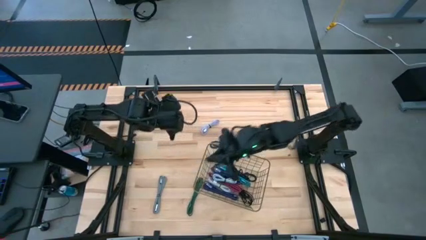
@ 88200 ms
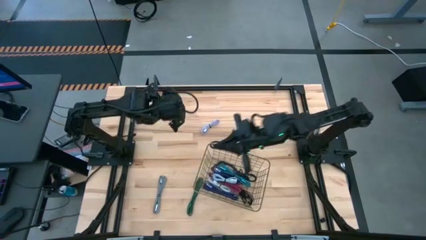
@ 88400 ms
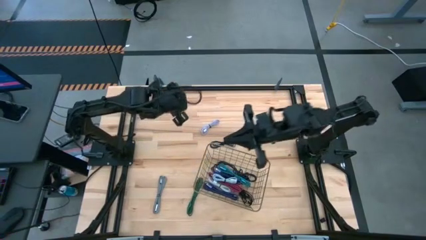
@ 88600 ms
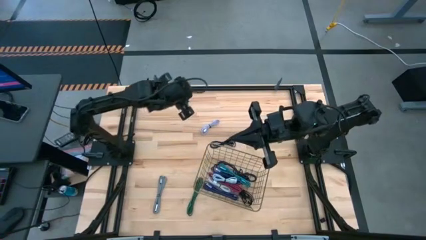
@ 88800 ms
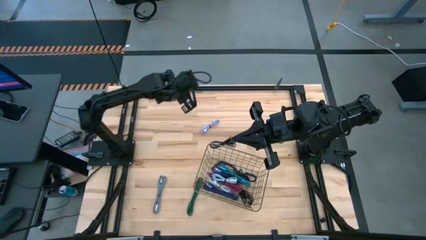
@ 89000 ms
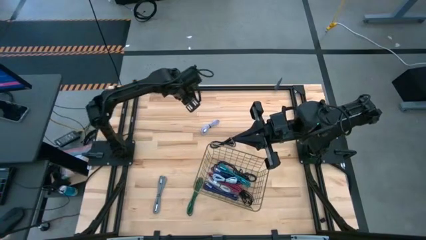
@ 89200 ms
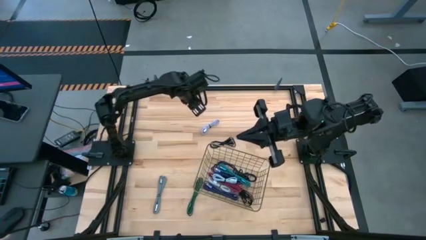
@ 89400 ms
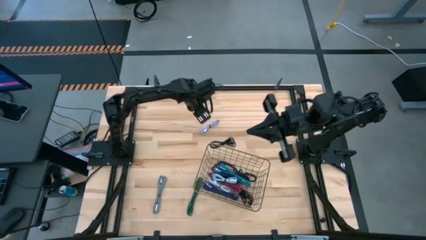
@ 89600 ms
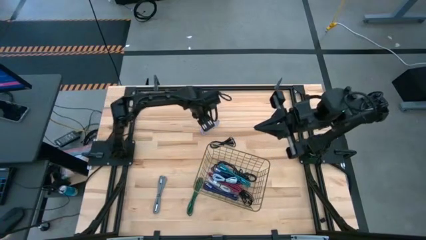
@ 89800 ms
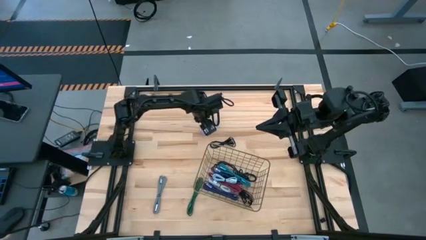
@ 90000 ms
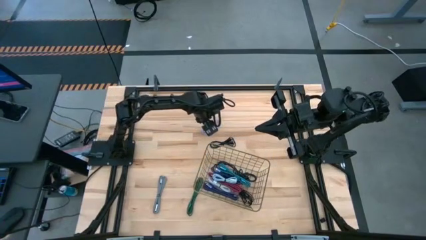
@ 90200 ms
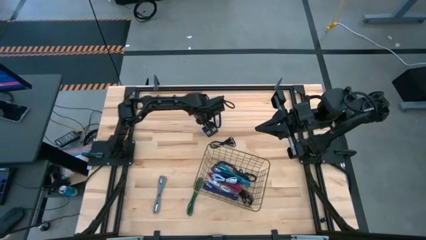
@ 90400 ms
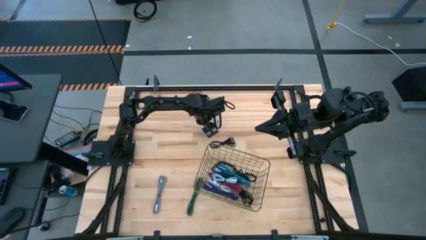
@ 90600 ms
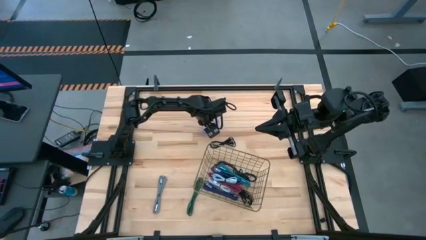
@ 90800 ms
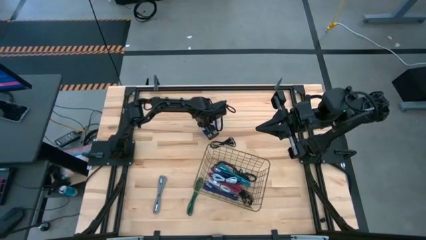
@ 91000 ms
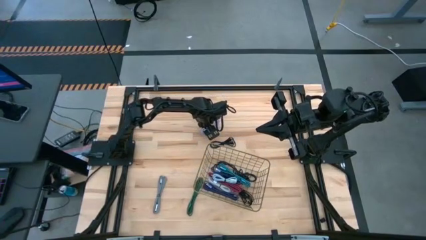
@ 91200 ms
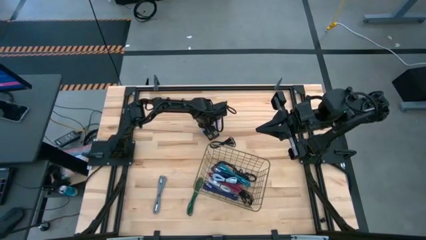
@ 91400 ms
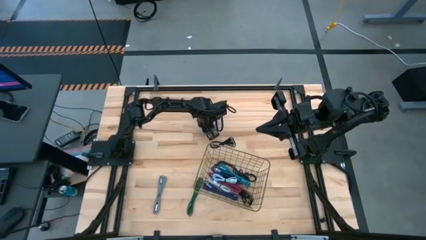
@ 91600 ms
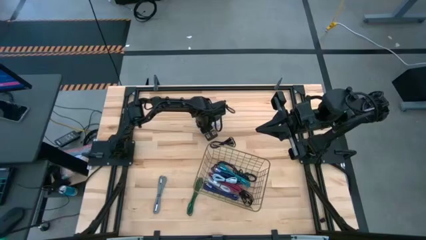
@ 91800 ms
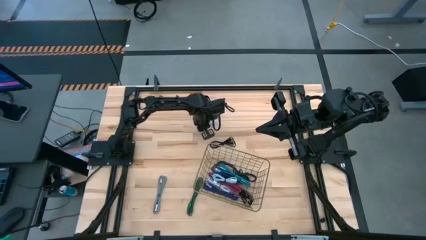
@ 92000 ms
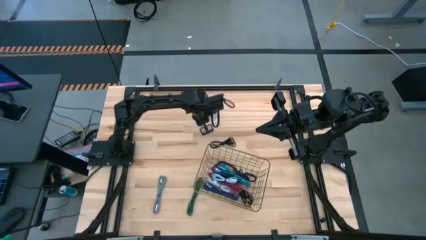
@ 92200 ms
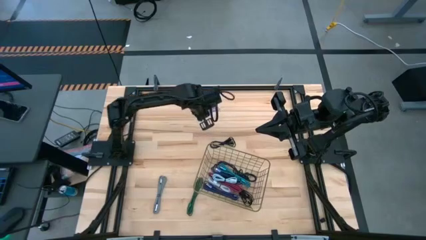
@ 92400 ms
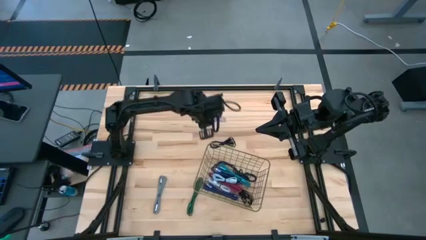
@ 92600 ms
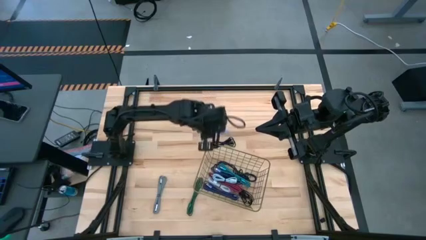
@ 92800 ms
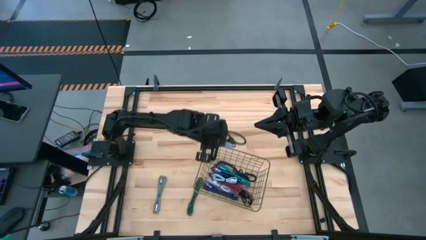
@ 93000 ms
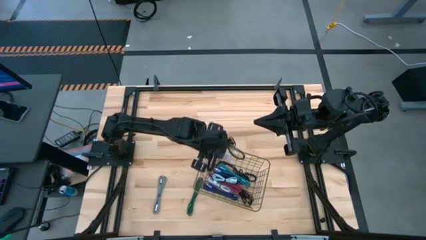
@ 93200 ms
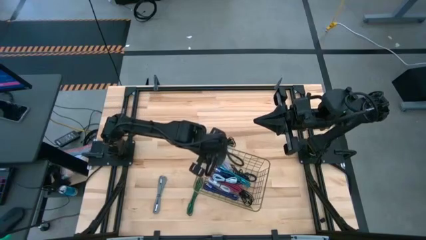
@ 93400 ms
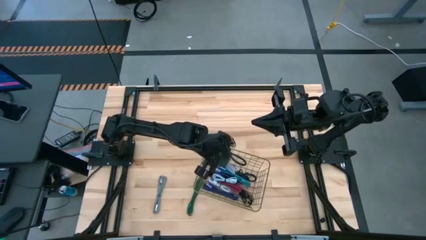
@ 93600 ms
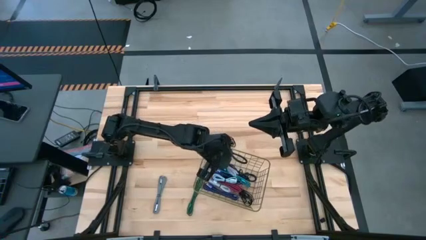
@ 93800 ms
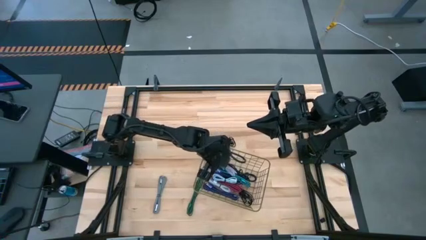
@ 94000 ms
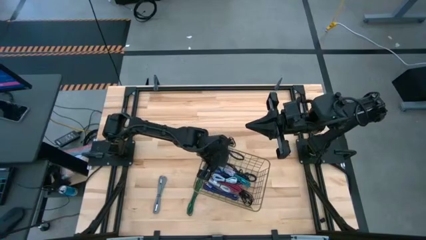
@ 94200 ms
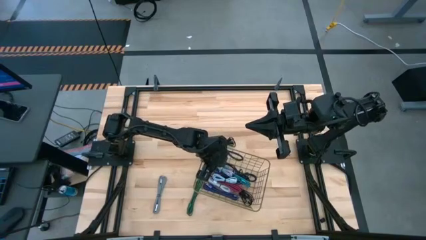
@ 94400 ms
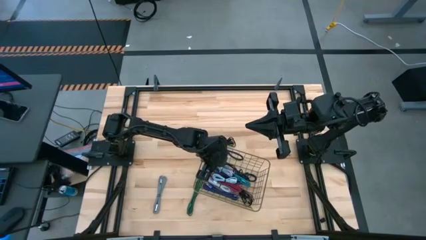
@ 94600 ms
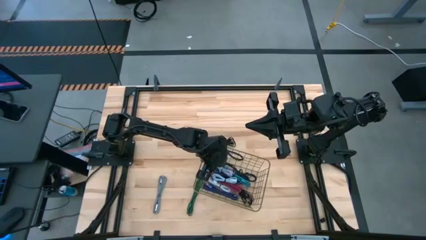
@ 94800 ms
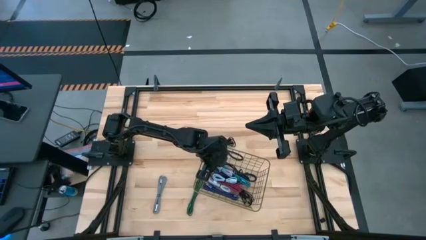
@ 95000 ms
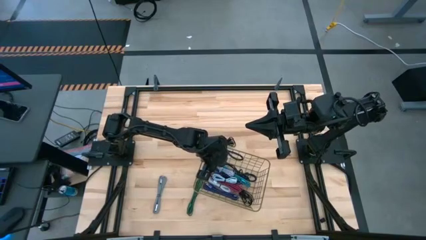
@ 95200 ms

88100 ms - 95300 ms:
Task: Pick and place USB-C Cables
Put the purple charger cable into the wire basket

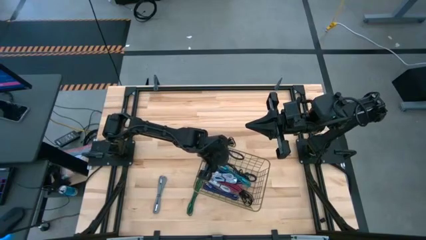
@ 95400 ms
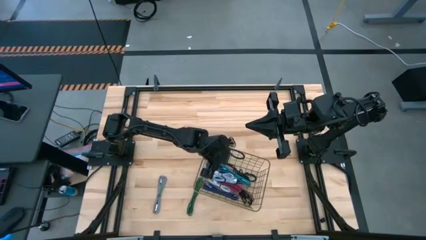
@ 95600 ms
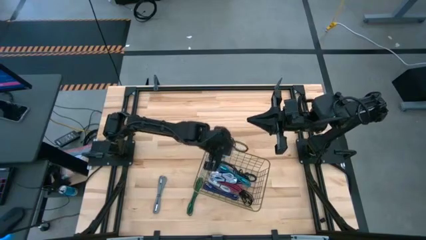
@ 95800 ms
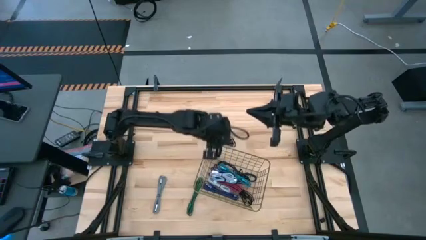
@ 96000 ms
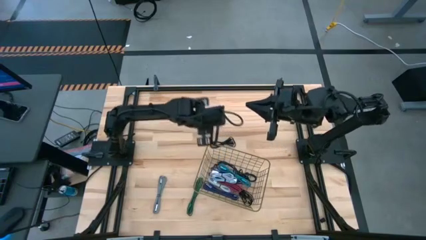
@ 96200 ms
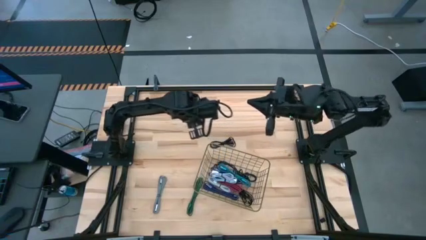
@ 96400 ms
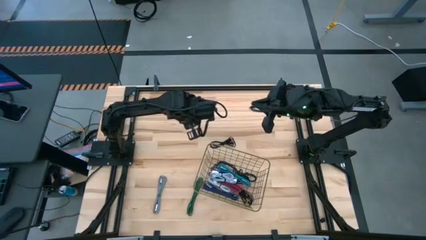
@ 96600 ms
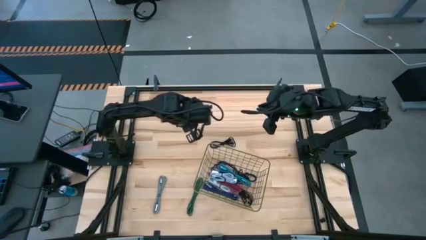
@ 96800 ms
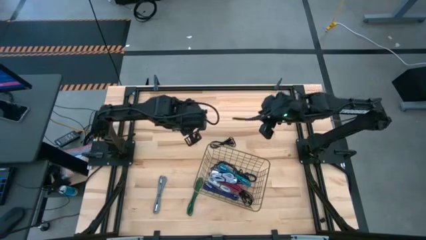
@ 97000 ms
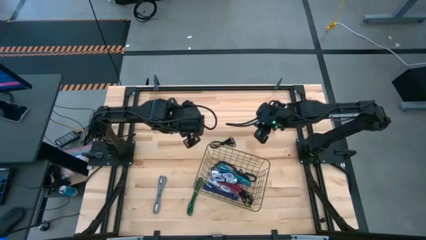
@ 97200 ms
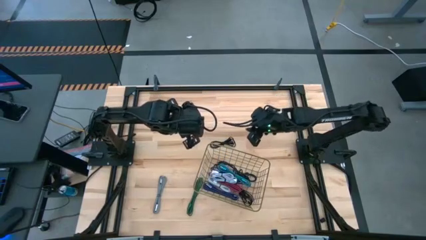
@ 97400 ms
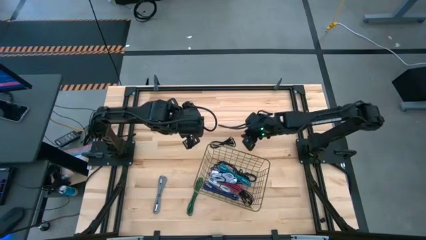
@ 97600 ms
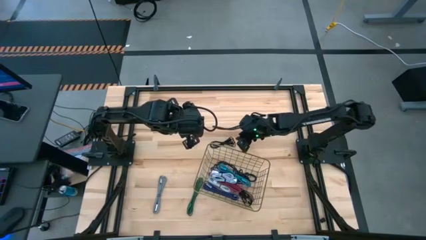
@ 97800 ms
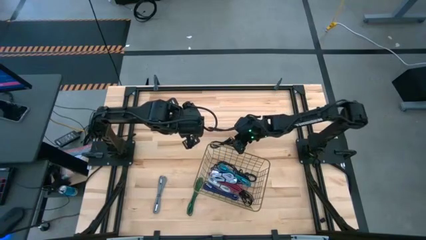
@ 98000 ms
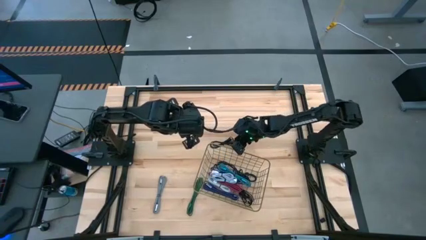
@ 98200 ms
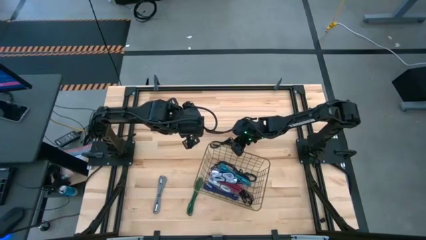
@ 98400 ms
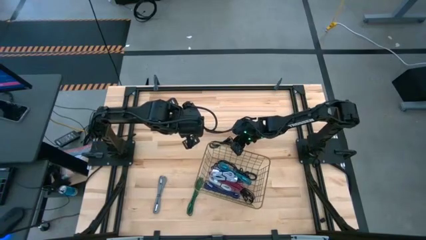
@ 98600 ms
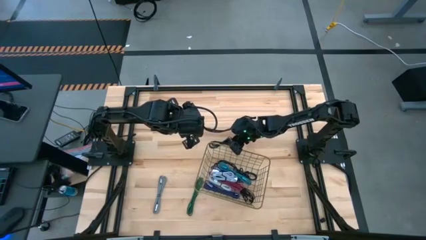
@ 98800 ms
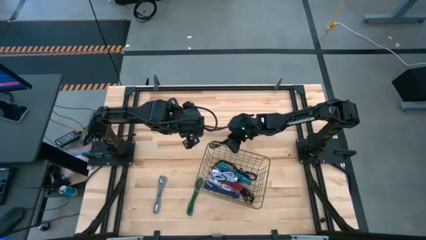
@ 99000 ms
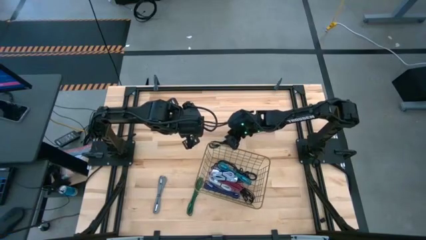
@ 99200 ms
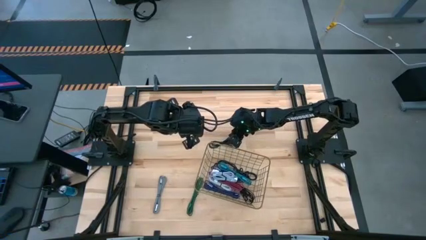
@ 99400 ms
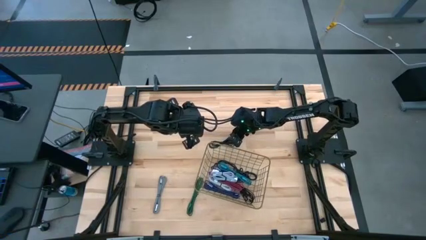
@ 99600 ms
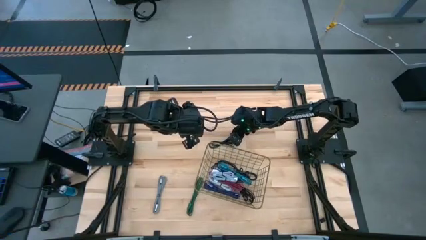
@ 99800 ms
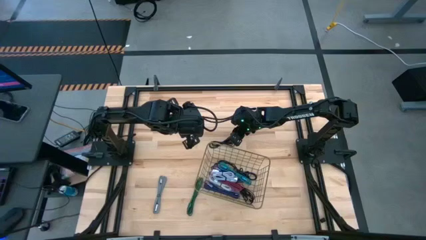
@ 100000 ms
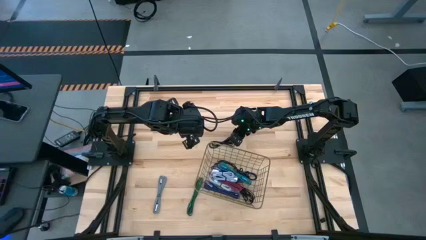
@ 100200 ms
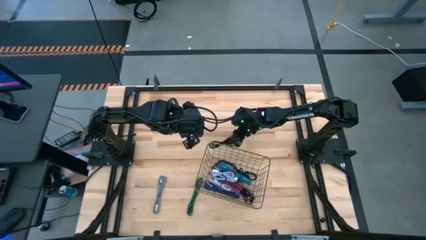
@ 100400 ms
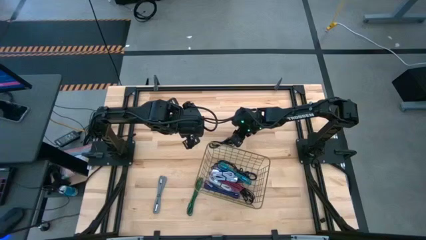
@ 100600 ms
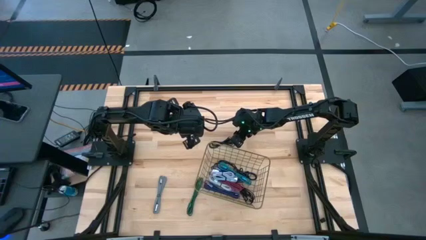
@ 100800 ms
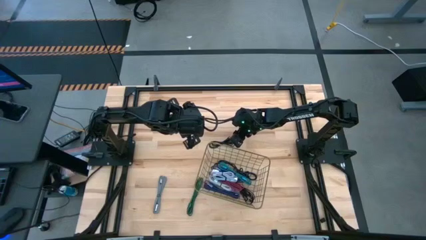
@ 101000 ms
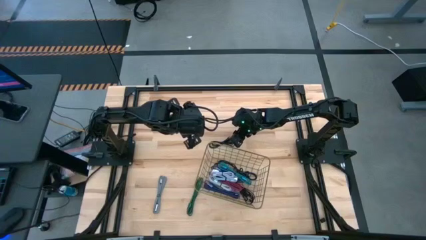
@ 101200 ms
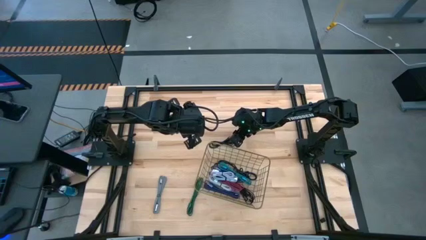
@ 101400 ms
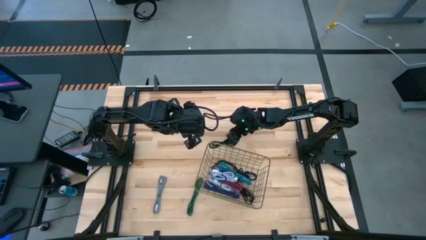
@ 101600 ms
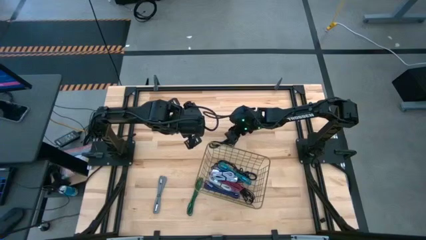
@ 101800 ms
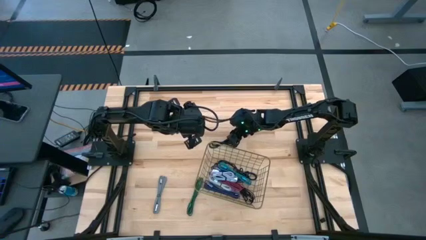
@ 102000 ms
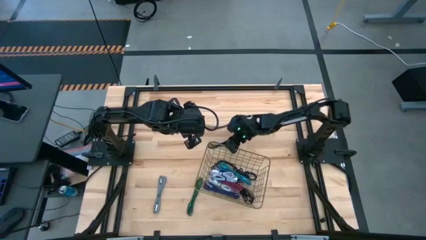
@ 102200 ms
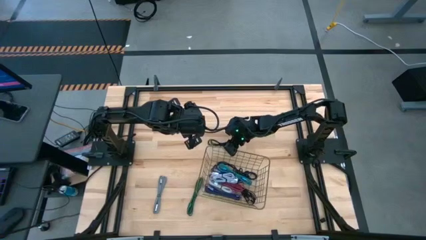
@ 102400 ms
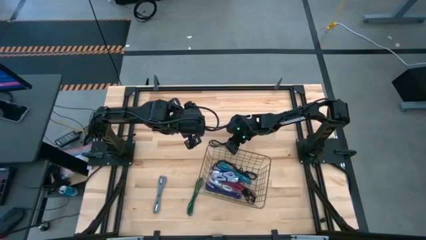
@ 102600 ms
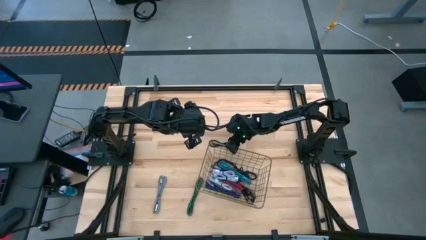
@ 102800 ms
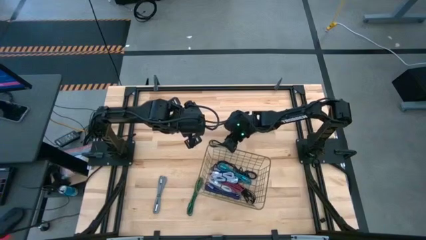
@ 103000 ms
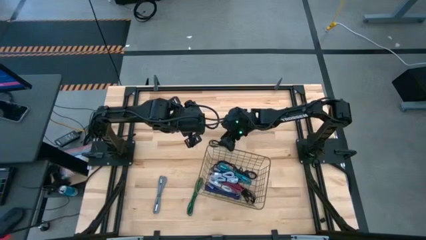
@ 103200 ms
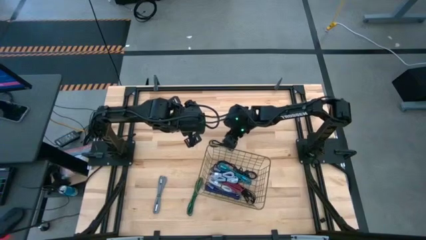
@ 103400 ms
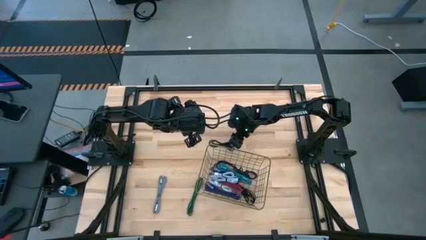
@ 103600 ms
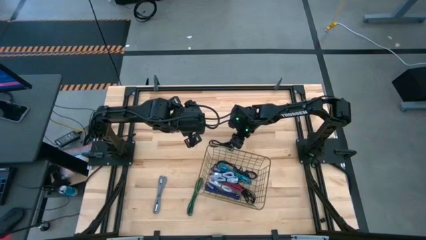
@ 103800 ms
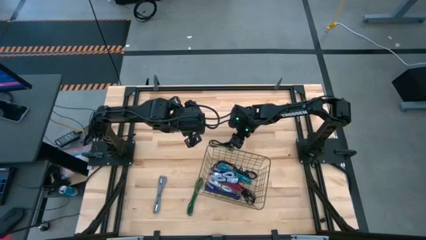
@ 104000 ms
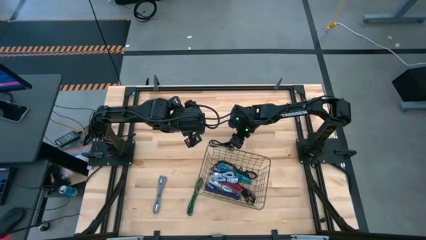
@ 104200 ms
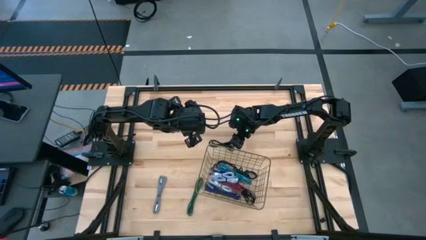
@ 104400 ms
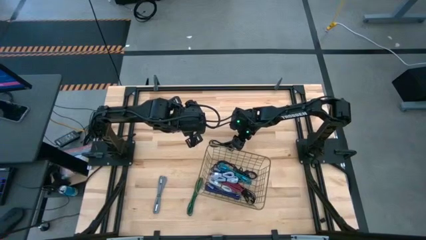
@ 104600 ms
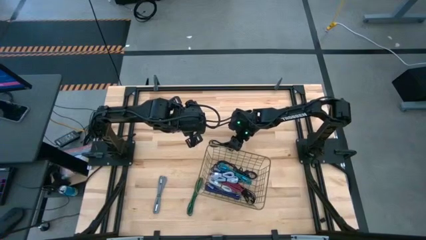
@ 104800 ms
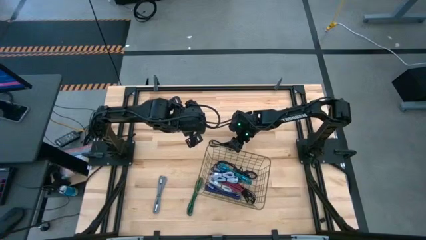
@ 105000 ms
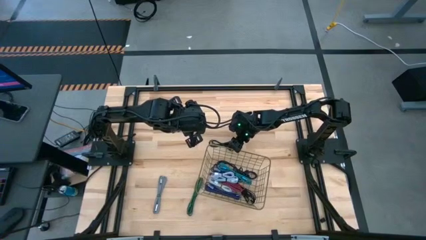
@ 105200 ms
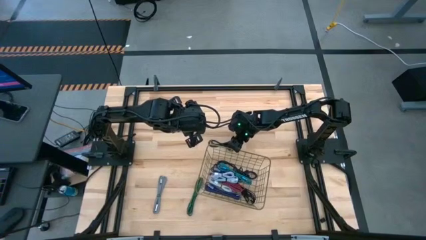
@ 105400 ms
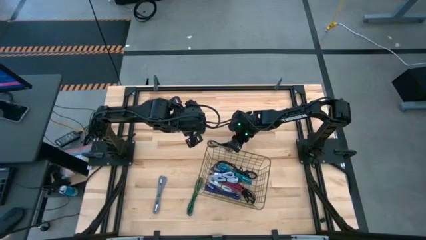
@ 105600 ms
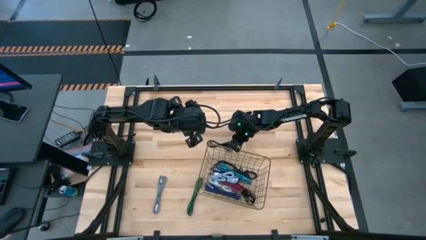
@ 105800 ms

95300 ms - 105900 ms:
Put the black charger cable into the wire basket
